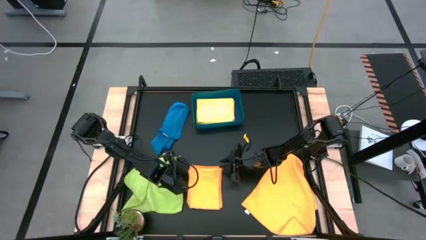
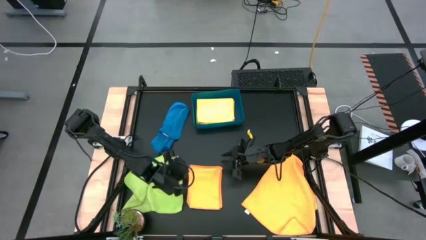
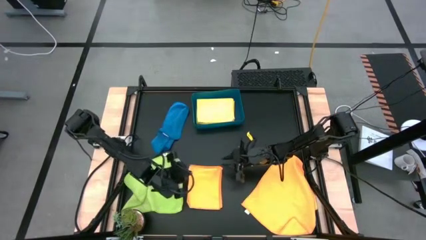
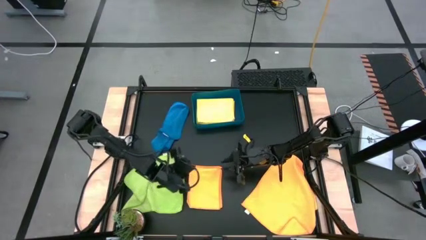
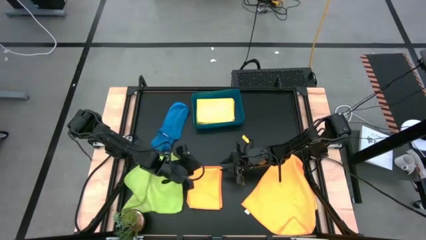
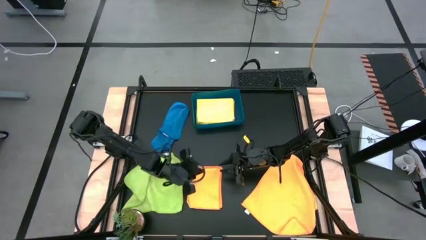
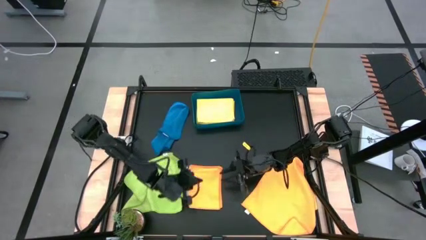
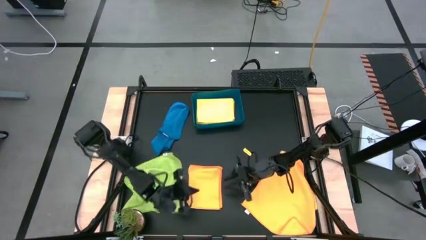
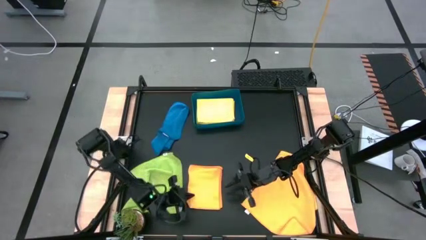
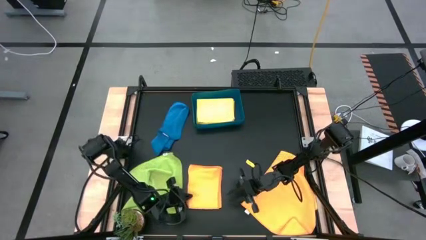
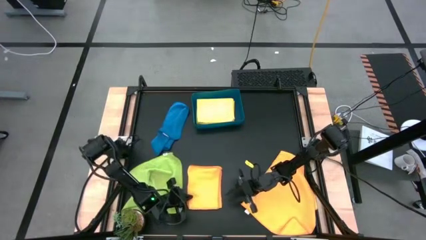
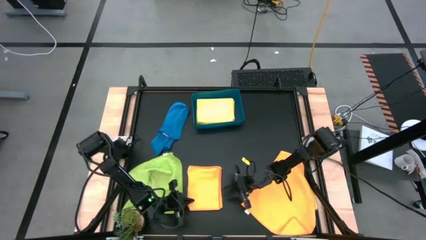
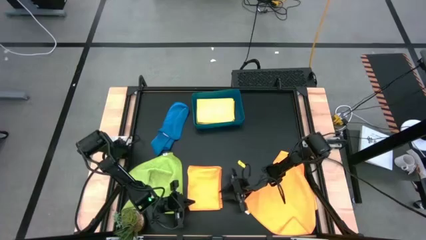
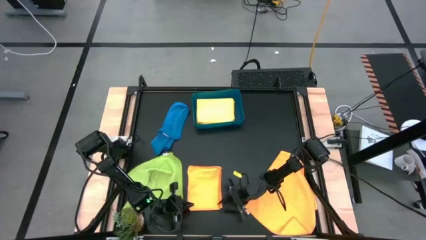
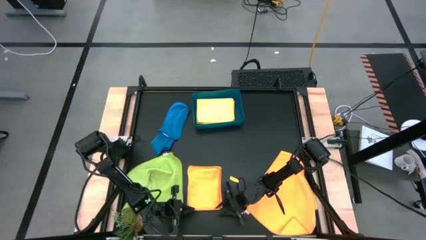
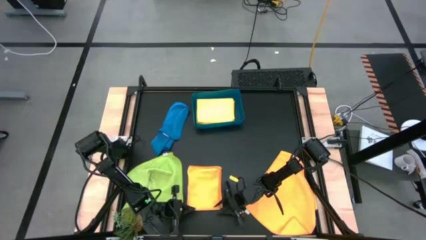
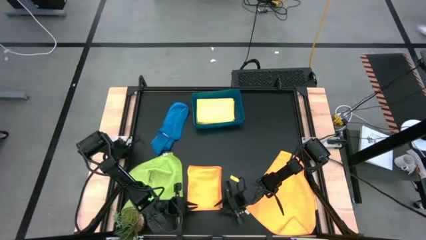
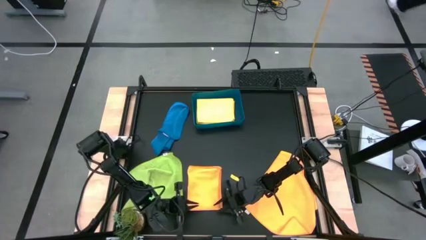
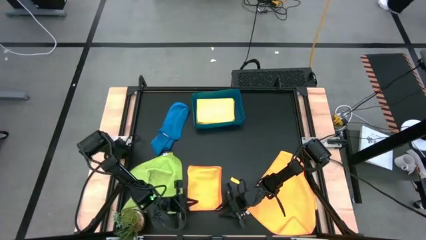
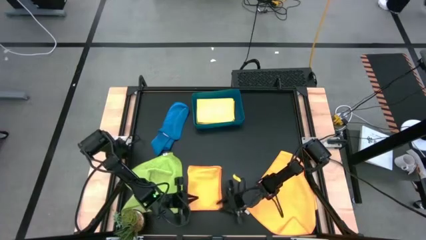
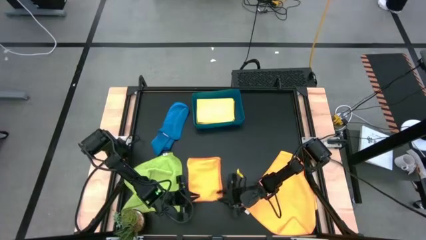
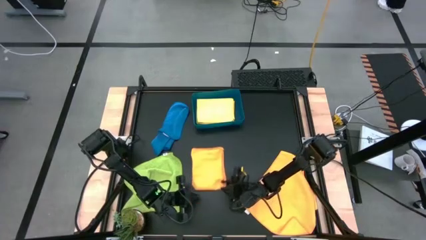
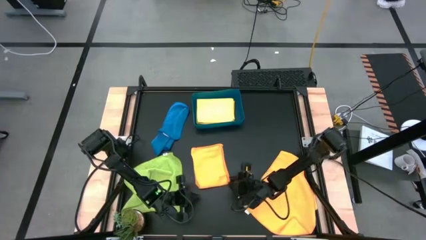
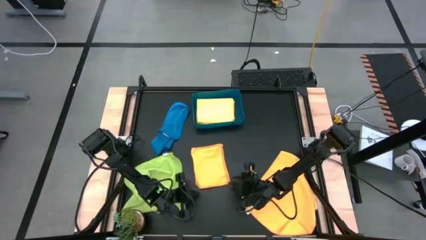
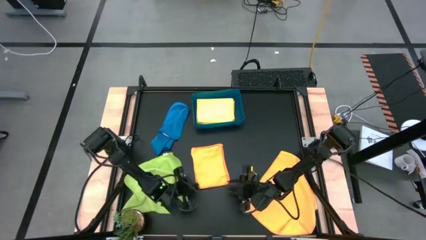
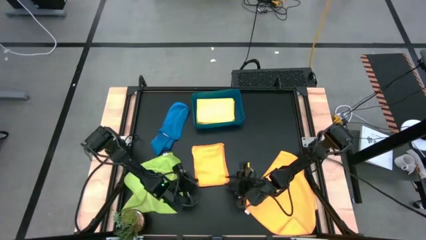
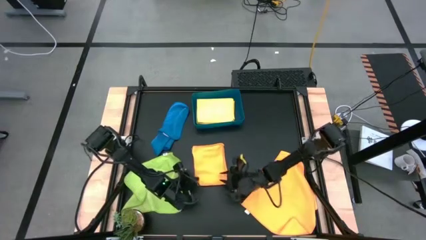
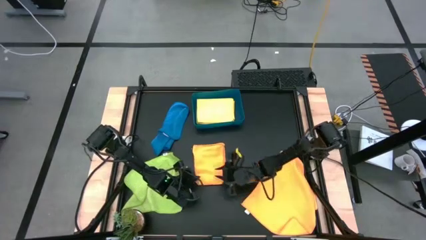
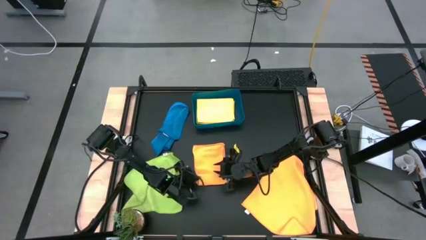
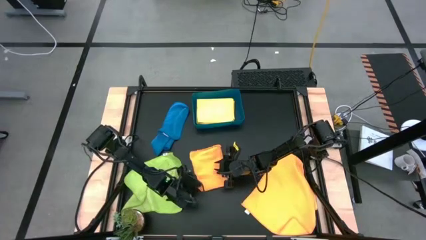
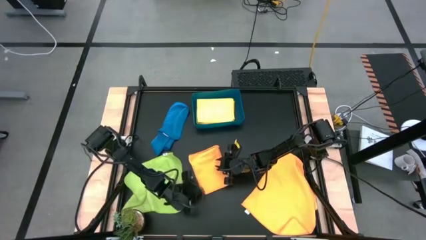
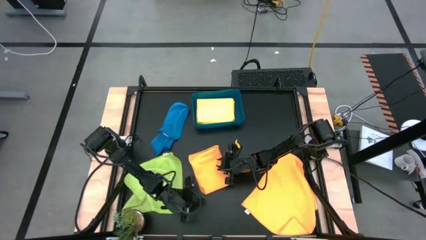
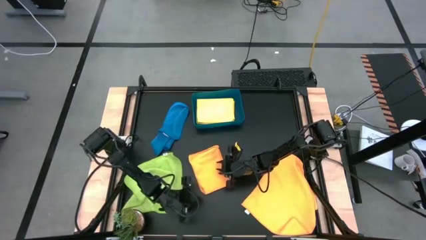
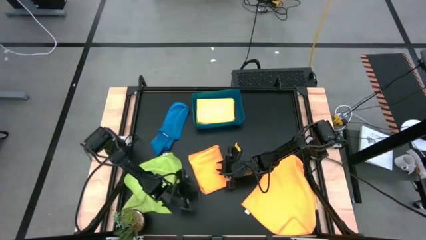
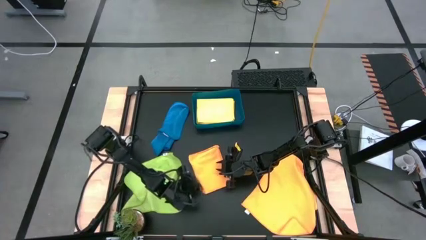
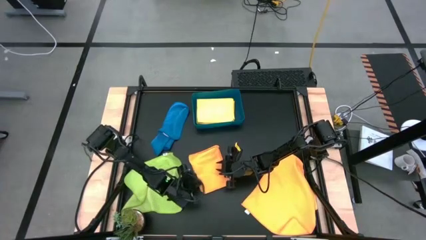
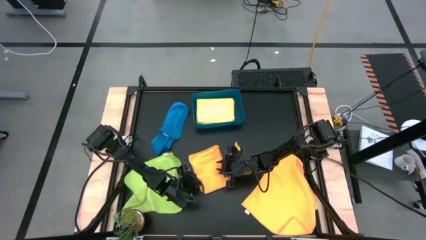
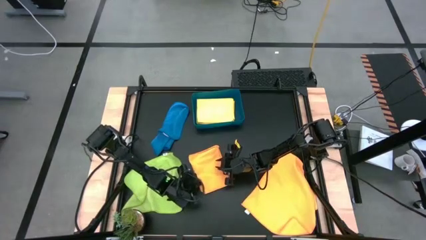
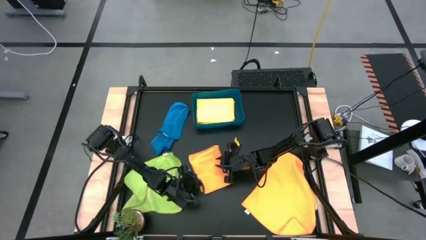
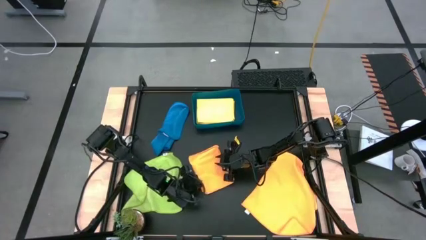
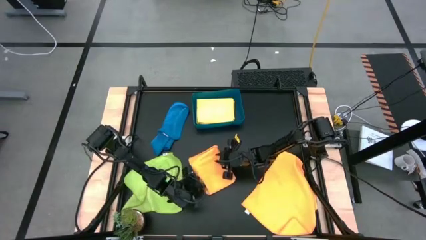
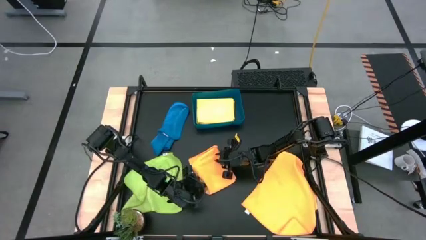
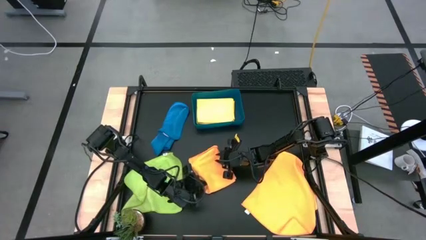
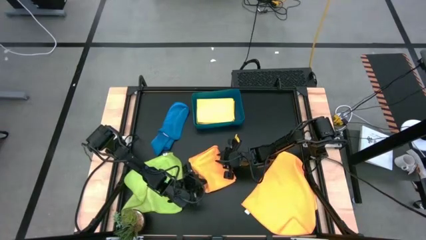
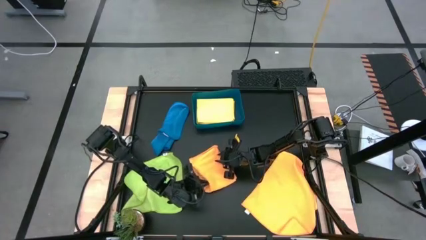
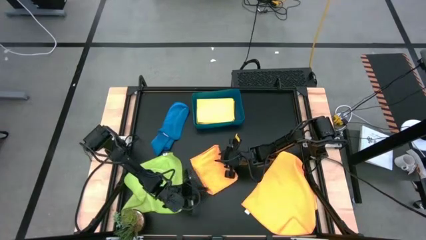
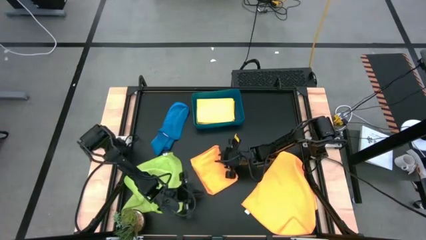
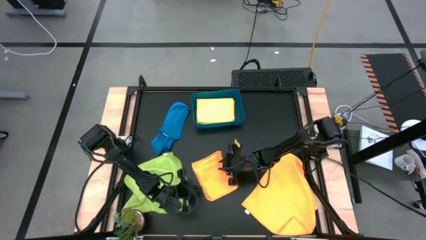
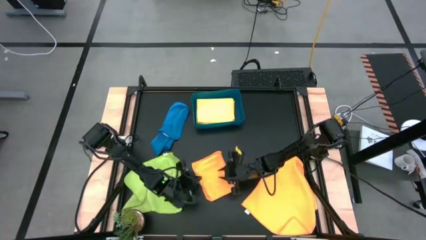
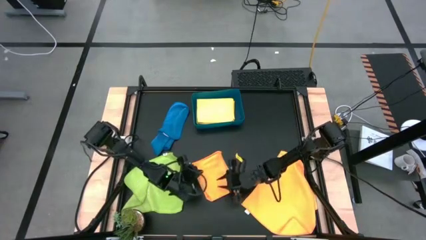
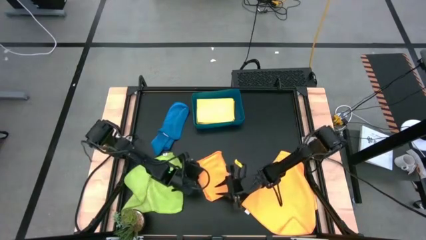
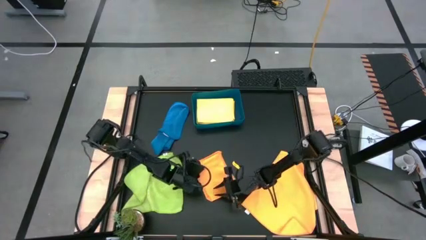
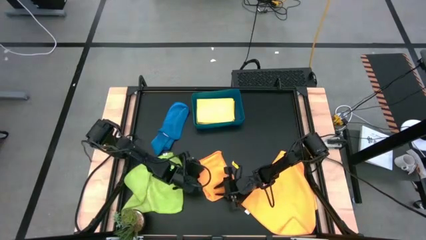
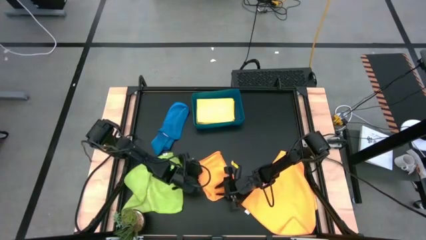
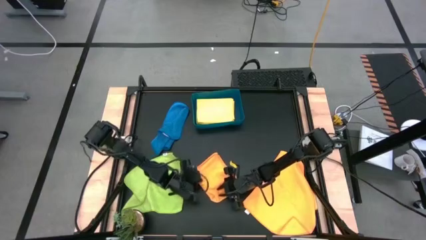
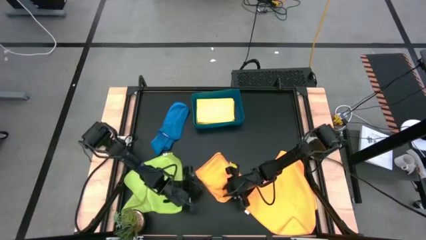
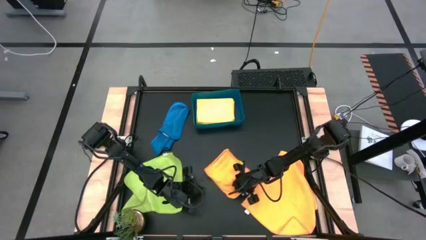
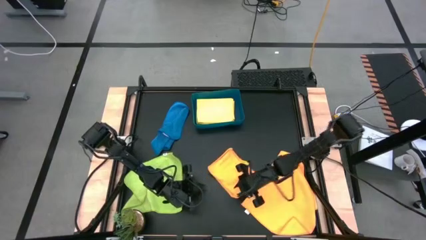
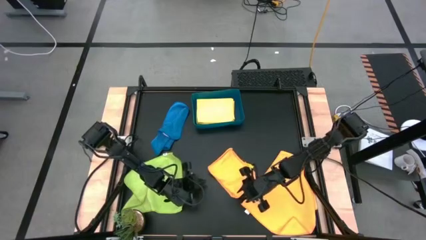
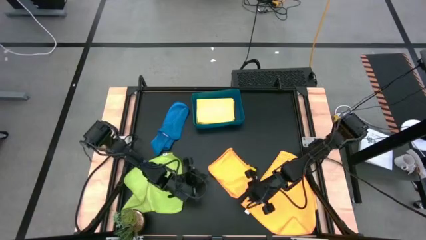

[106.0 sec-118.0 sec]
Task: Fold microfiber towels
Put the folded orange microfiber cloth into the blue bin
